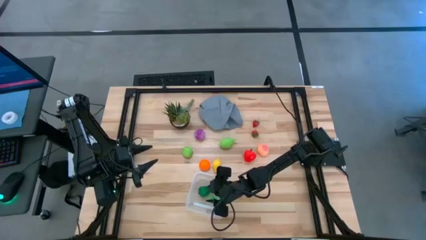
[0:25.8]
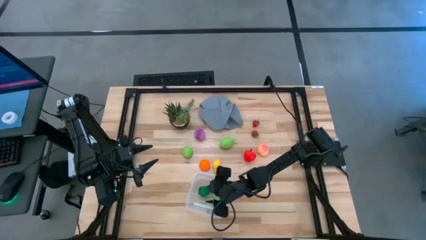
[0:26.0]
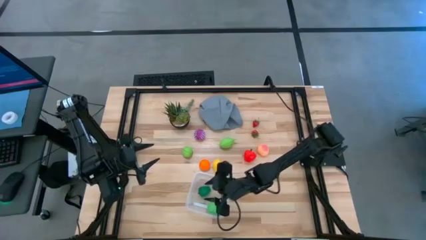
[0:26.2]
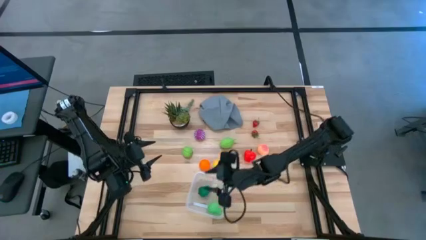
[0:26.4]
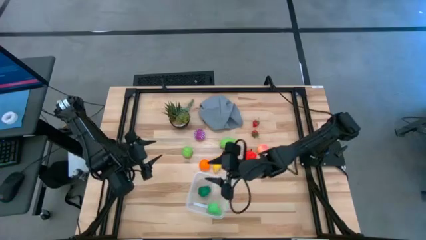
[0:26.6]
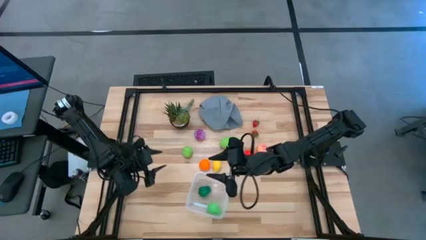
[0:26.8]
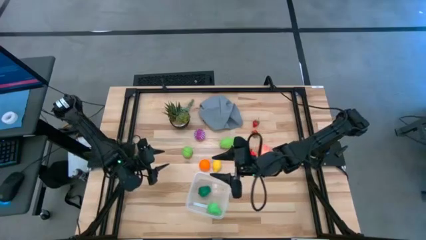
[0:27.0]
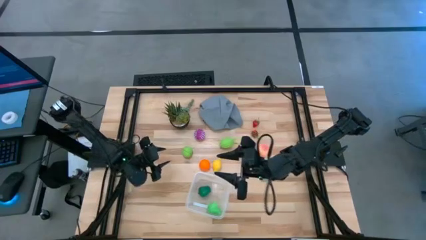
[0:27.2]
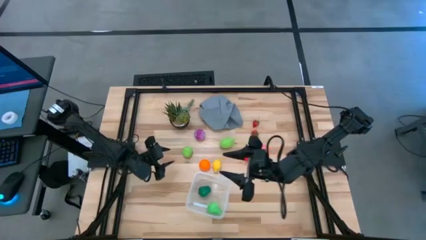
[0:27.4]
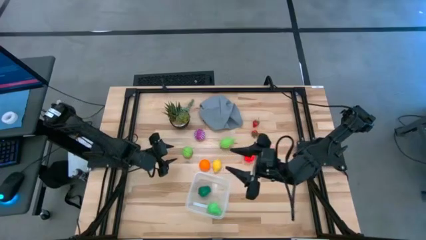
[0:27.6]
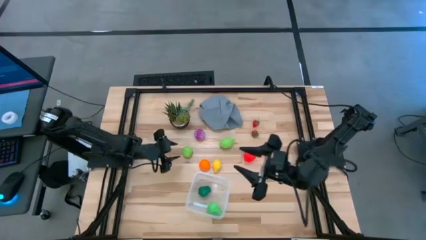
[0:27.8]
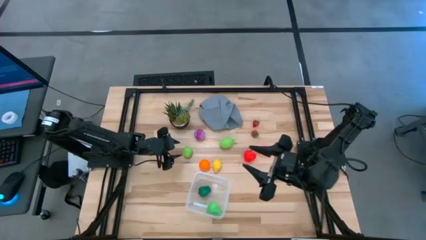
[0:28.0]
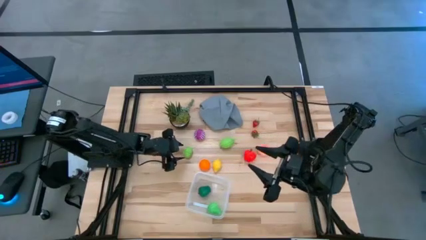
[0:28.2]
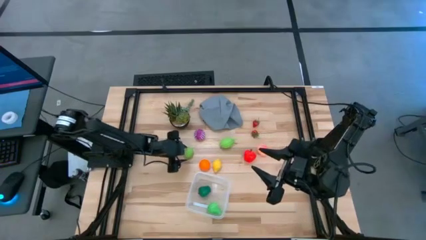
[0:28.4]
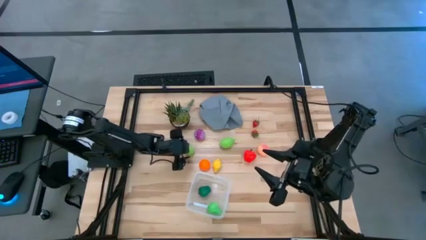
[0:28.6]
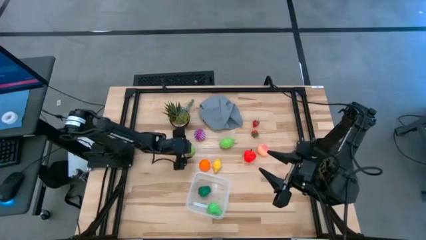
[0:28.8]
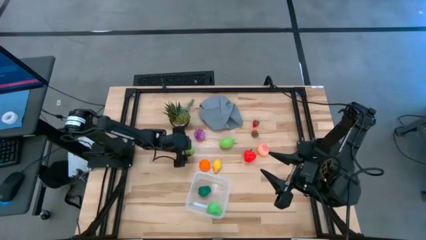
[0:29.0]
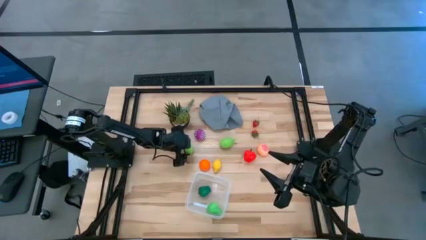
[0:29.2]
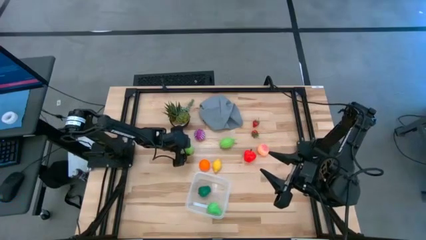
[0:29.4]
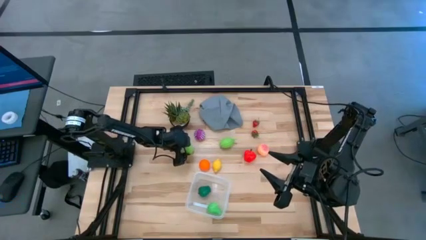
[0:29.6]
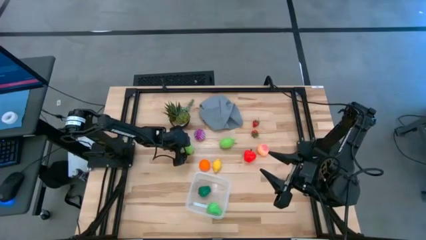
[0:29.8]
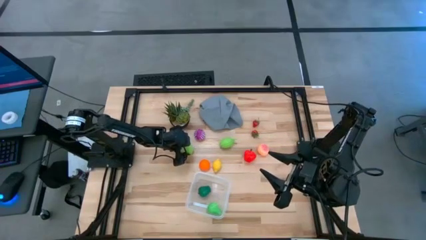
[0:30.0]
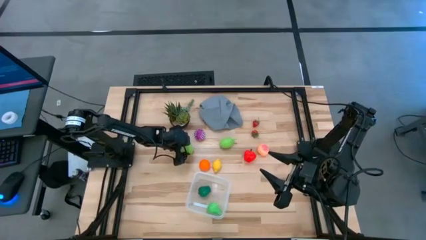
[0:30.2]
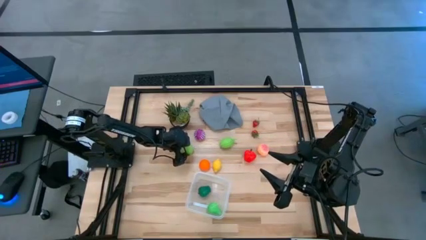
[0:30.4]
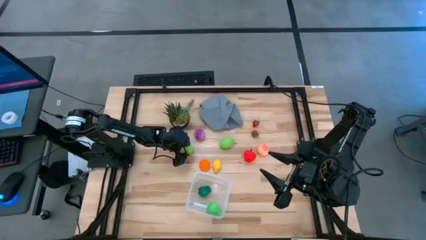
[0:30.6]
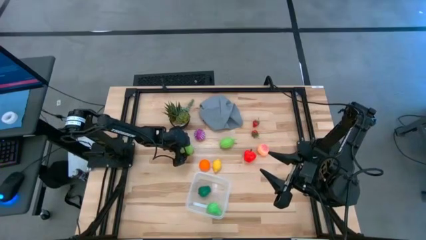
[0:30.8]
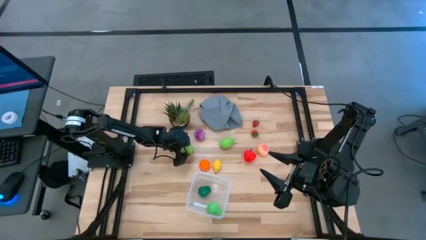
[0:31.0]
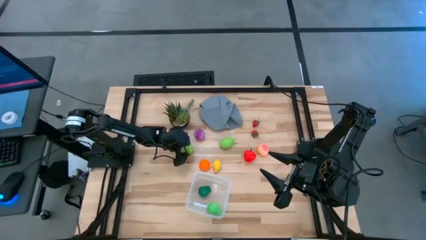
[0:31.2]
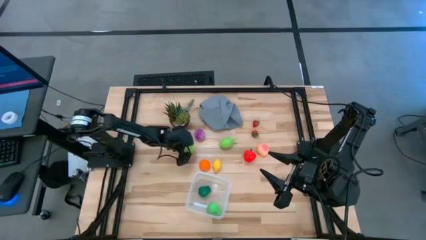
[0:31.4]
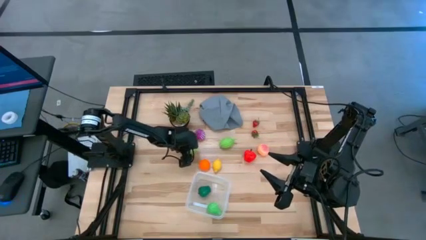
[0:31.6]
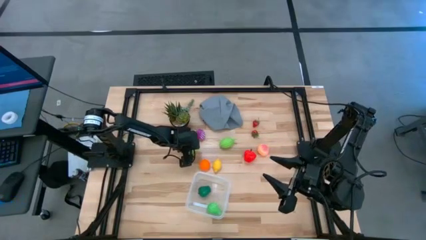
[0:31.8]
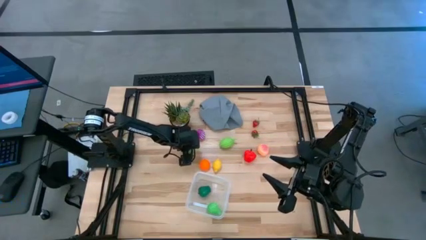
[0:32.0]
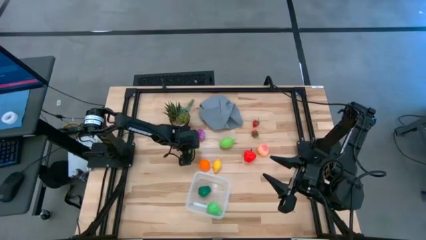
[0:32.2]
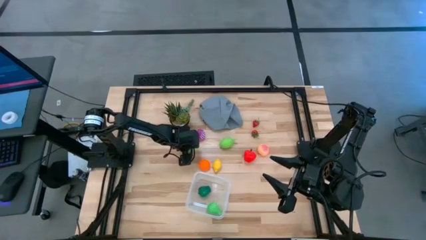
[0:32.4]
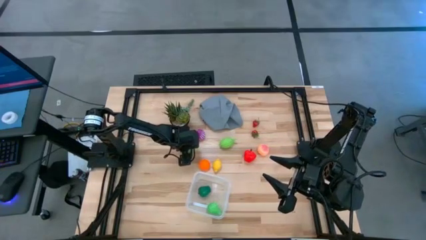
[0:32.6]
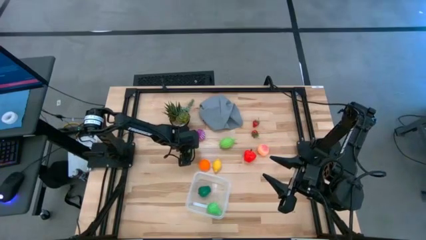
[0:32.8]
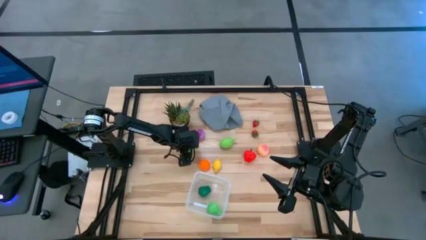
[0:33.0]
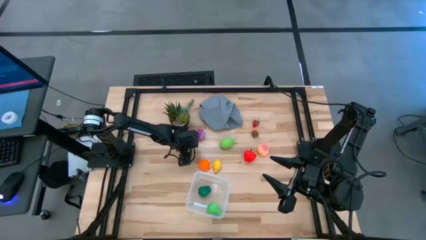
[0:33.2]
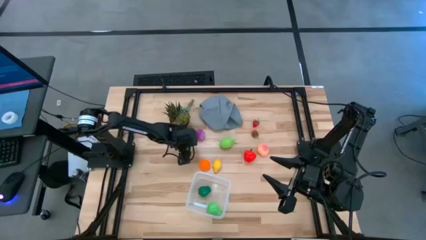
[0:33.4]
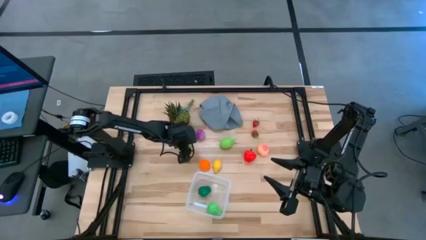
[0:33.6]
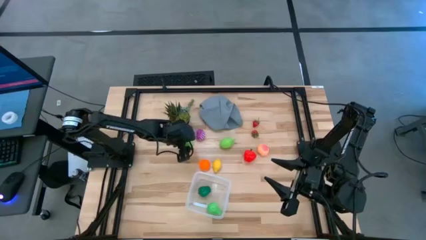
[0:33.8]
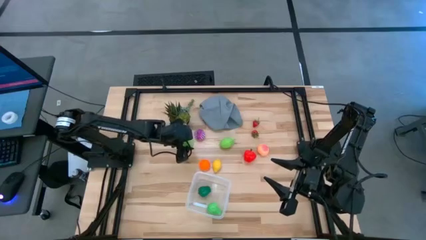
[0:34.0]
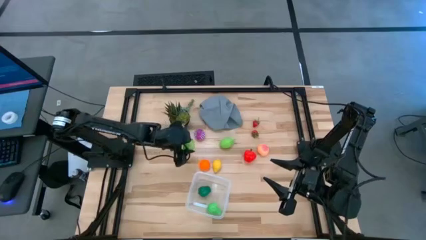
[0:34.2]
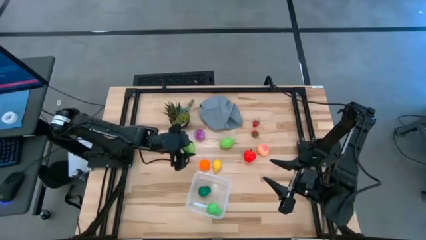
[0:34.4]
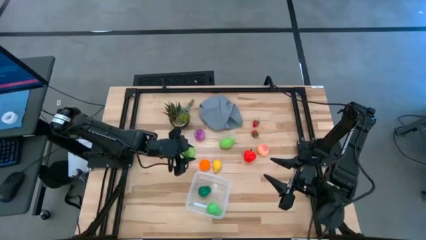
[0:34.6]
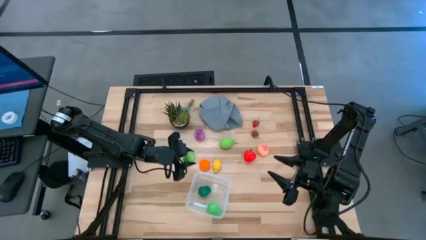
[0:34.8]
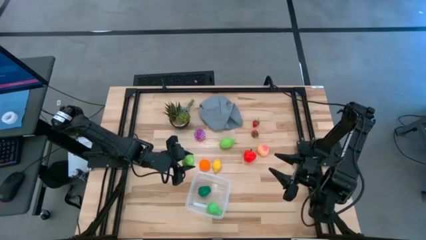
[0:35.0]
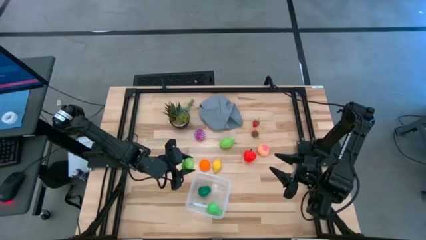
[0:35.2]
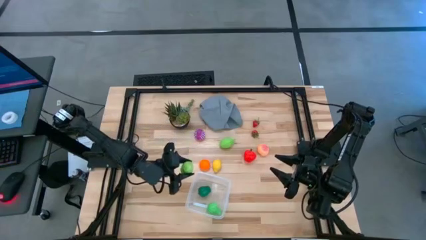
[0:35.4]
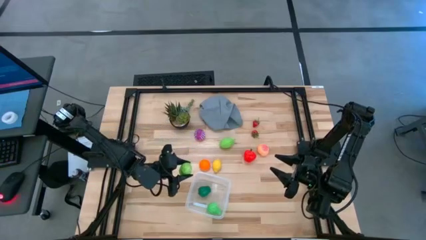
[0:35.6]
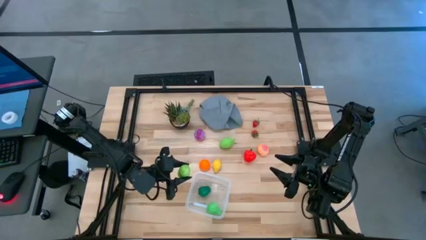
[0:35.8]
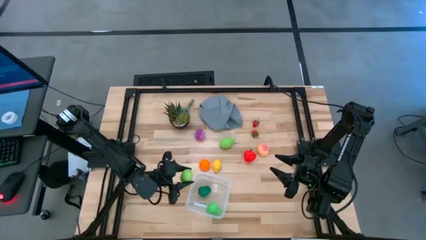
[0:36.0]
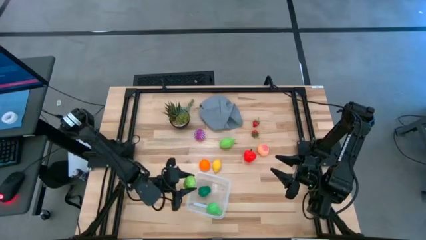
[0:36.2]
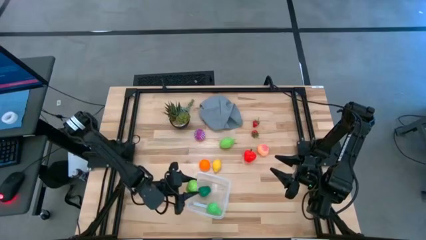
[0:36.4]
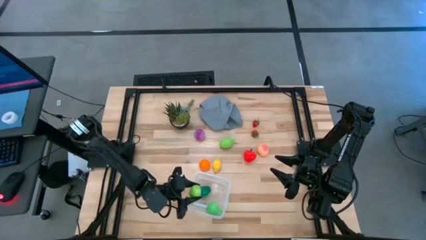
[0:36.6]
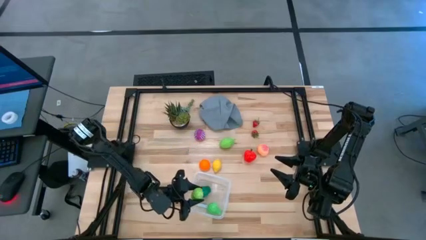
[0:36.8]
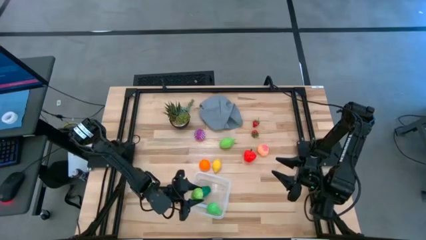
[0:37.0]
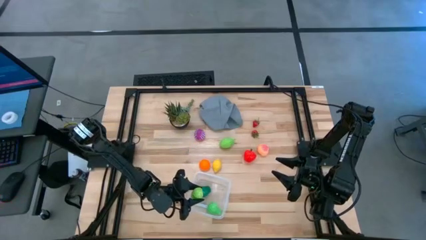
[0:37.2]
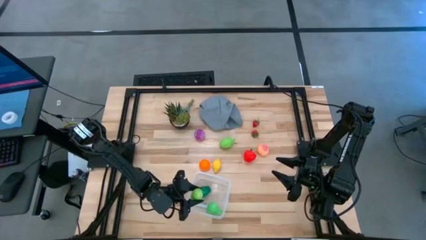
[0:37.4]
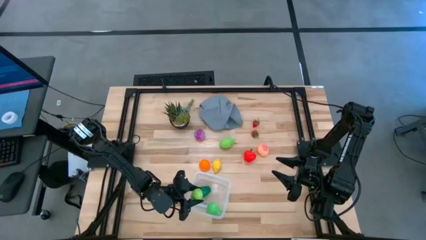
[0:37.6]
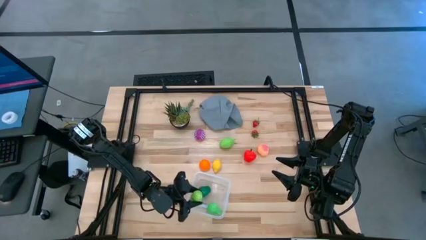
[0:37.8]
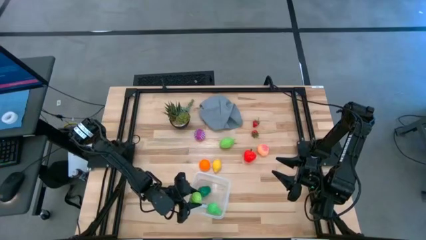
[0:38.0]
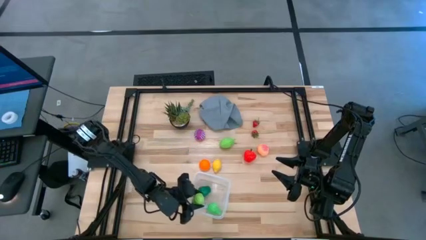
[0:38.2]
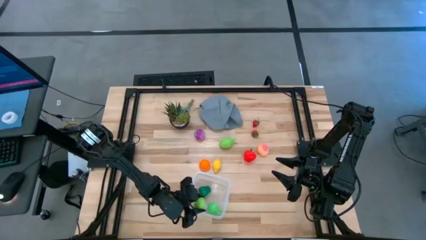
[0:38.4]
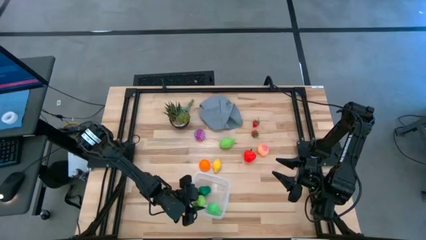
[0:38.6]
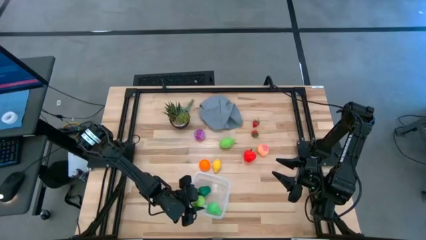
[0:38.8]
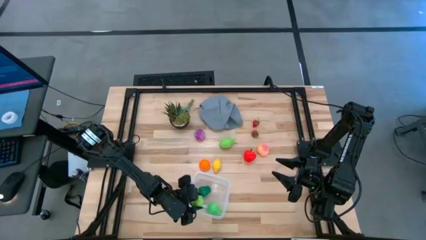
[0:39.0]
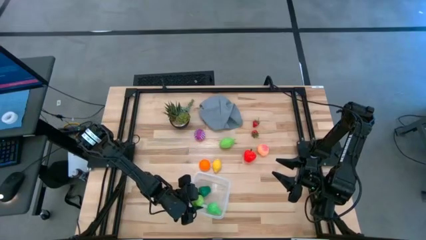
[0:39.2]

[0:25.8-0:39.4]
Task: Pick and placing Produce into tupperware
Put the cabbage into the transparent bin
